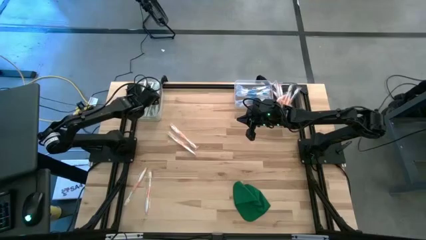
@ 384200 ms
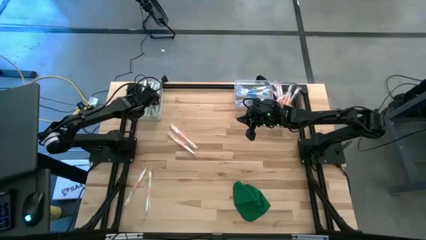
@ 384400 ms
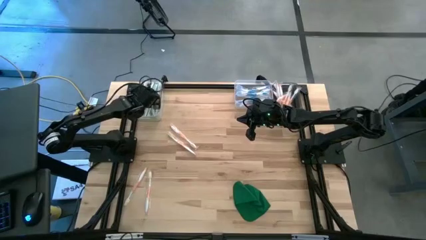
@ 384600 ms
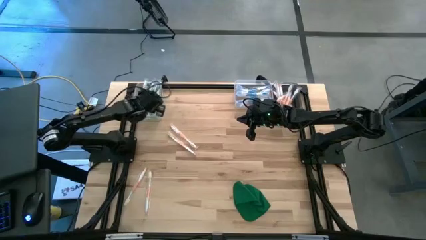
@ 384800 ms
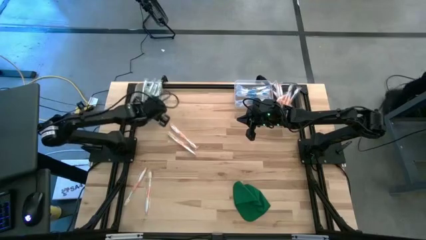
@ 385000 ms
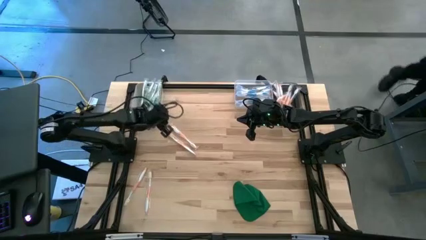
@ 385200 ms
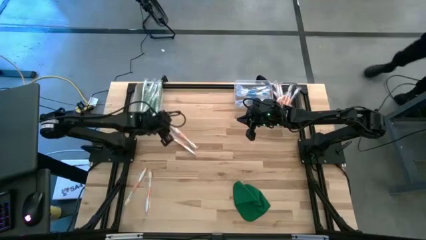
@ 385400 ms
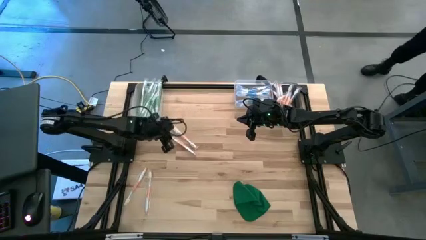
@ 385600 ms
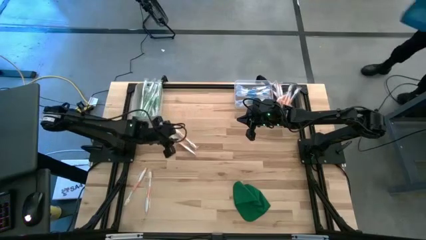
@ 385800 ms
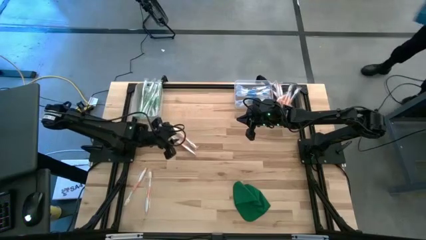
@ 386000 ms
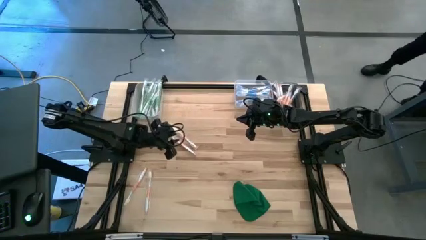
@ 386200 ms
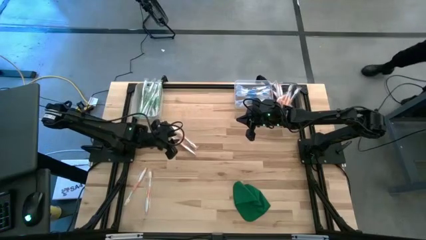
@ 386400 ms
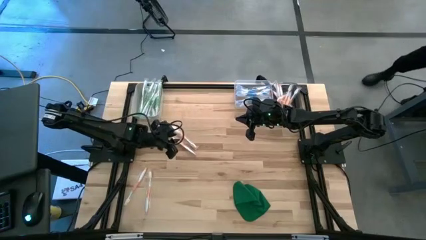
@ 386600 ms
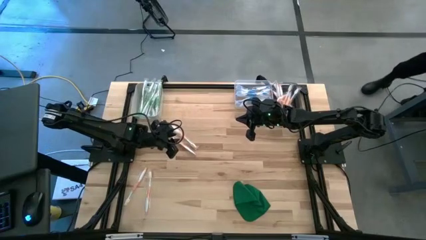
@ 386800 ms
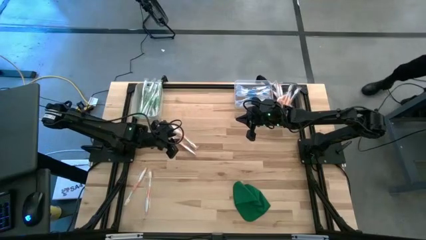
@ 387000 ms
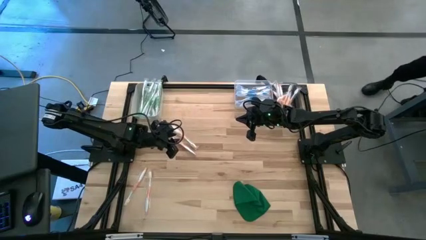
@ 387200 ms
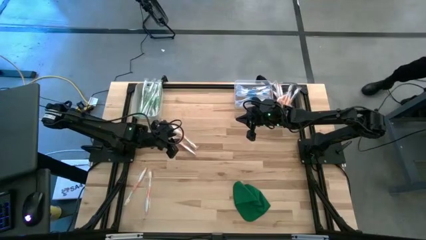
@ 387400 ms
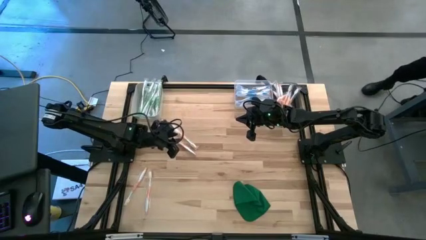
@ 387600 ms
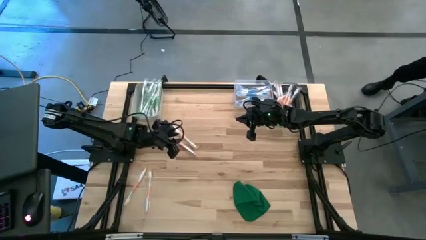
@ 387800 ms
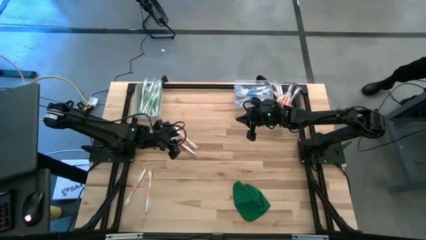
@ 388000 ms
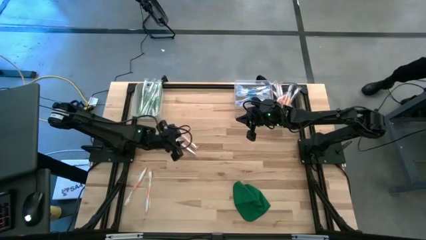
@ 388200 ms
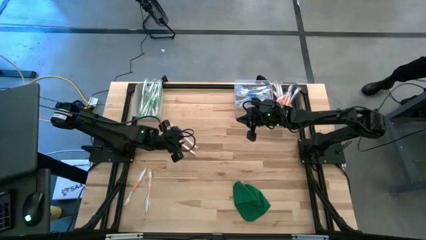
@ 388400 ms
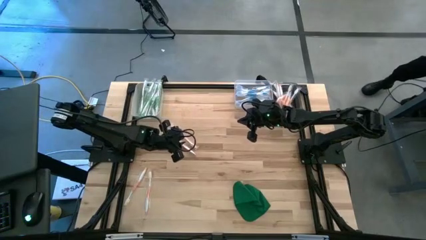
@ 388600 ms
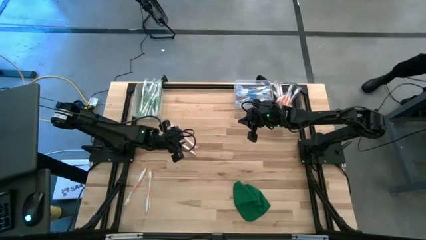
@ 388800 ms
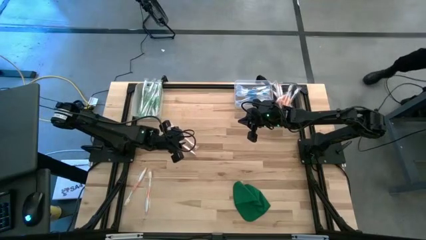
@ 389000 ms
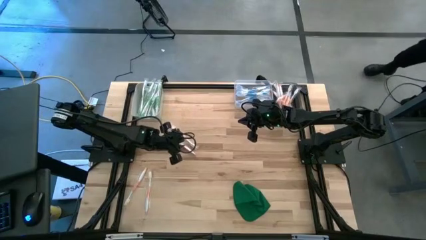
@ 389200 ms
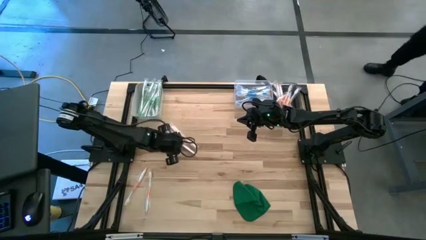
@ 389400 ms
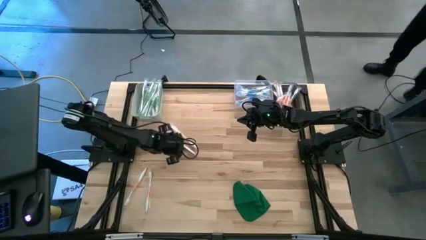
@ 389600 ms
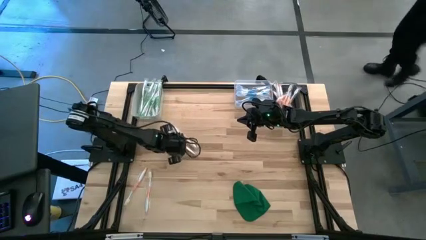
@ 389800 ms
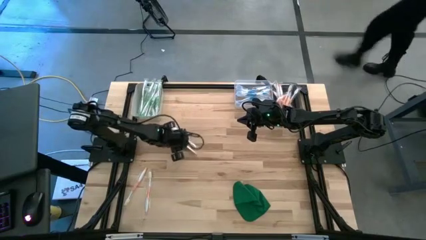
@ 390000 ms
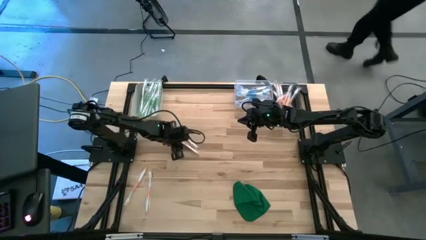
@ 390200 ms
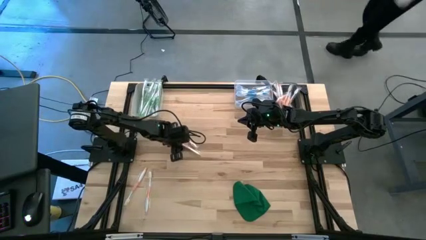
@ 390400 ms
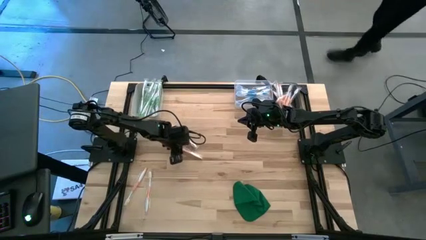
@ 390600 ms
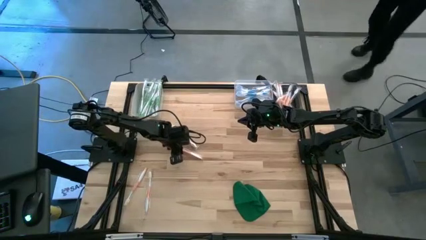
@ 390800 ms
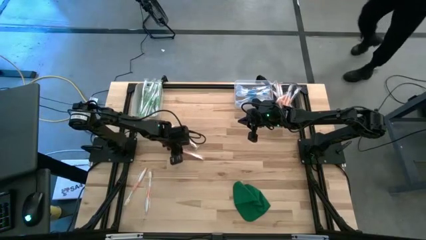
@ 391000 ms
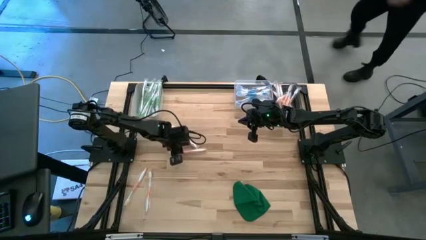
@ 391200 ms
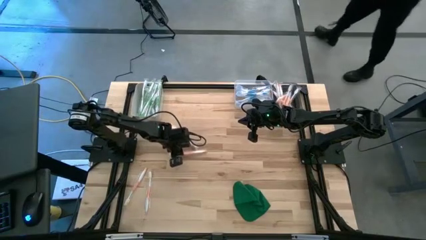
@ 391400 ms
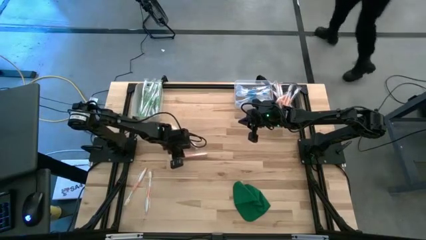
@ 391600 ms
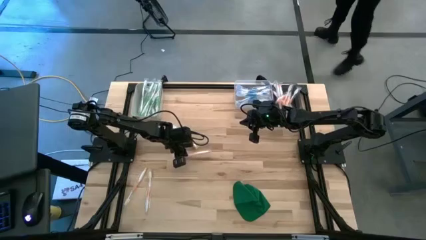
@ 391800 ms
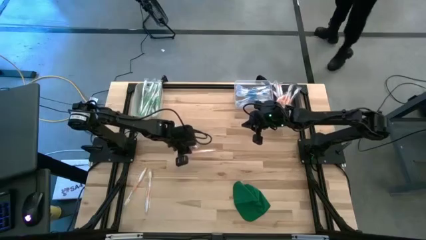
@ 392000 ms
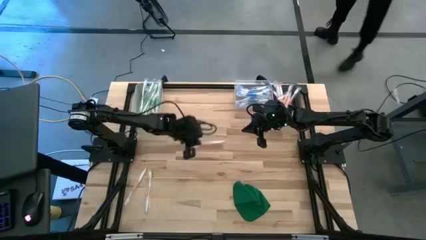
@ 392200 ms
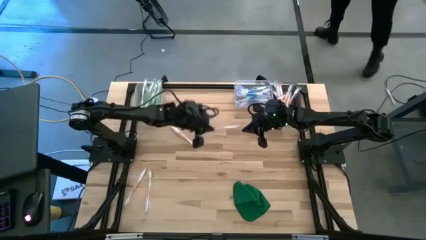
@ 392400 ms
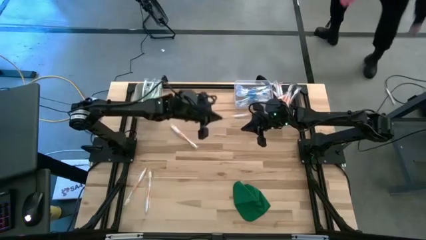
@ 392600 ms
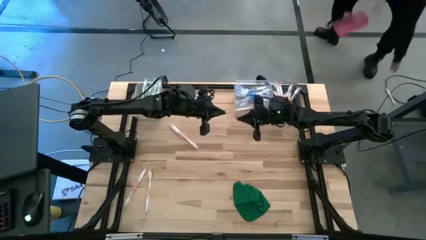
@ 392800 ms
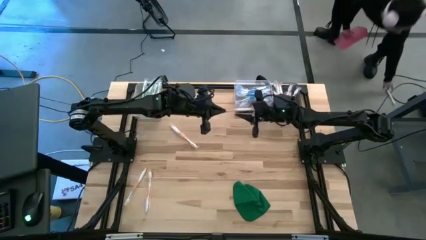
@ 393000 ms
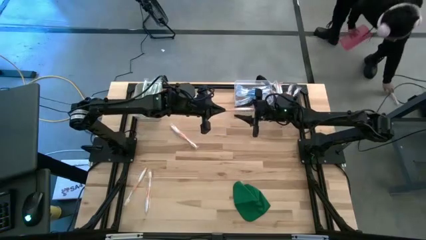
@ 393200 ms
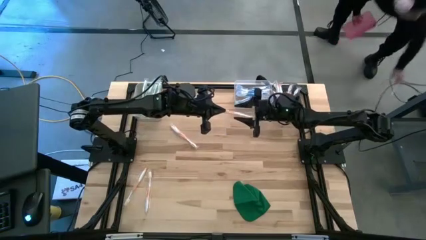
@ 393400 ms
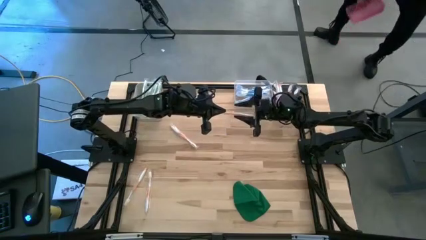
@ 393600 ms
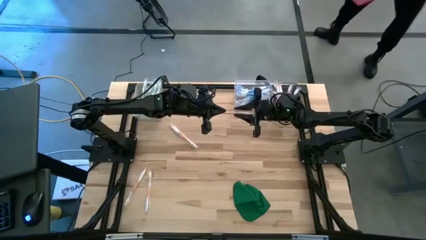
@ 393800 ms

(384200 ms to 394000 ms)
Task: Pick & Place Toothbrushes
Put the orange toothbrush into the black bin

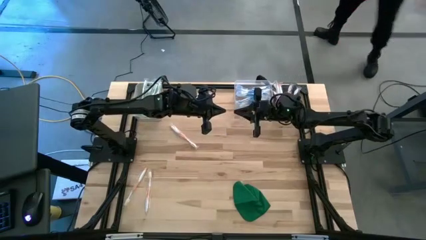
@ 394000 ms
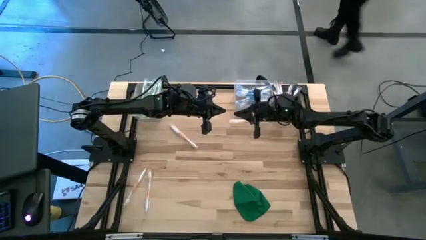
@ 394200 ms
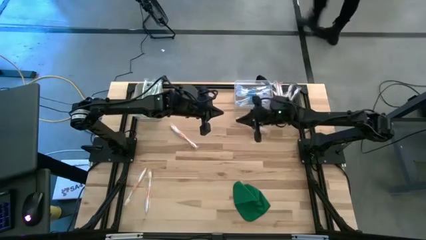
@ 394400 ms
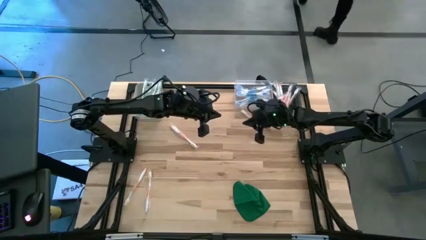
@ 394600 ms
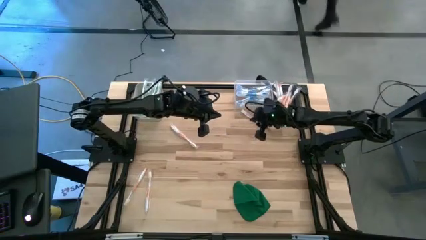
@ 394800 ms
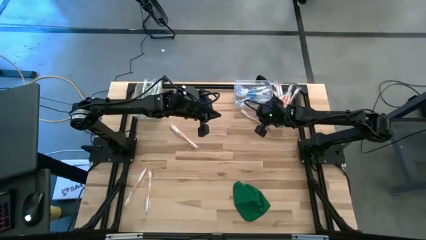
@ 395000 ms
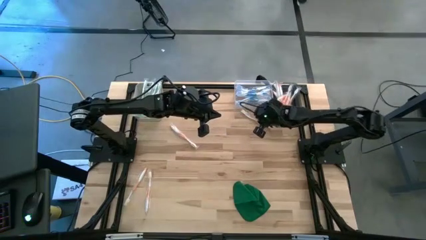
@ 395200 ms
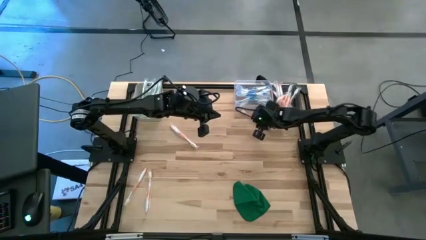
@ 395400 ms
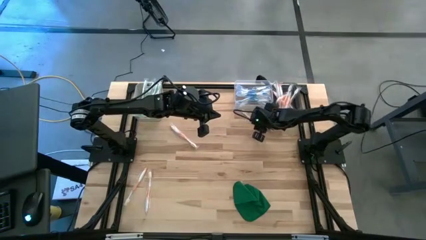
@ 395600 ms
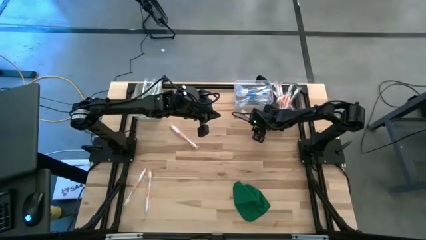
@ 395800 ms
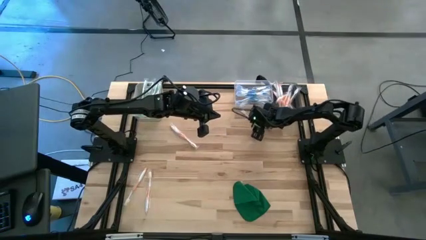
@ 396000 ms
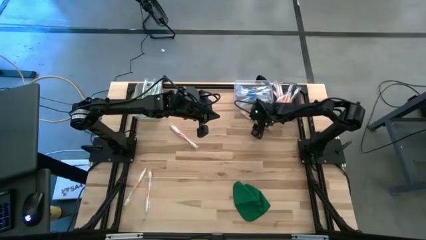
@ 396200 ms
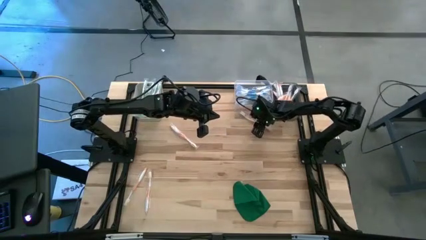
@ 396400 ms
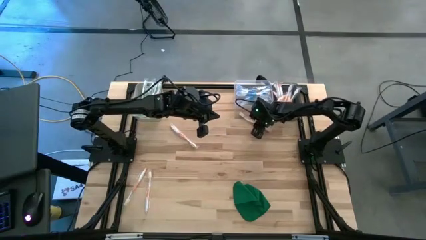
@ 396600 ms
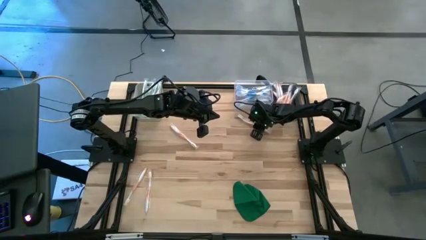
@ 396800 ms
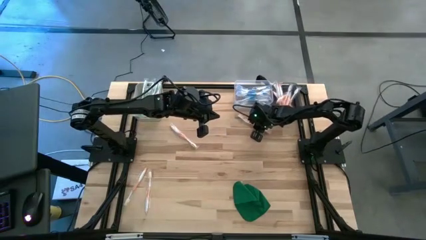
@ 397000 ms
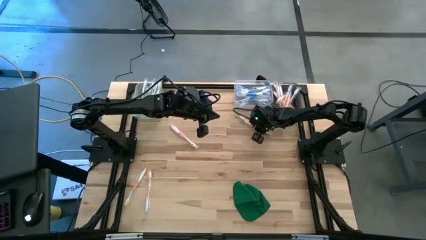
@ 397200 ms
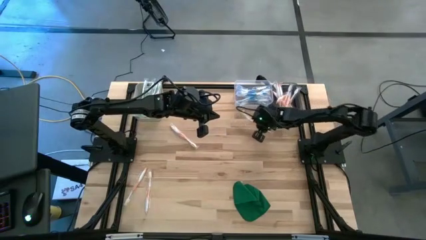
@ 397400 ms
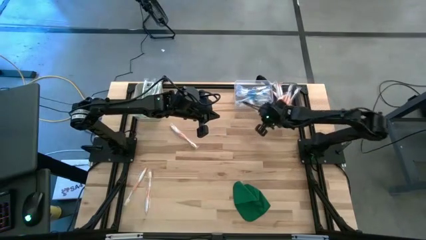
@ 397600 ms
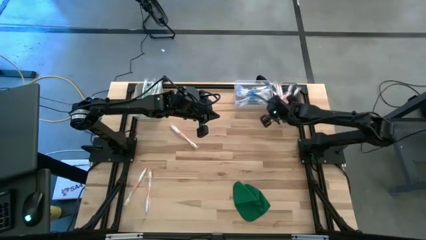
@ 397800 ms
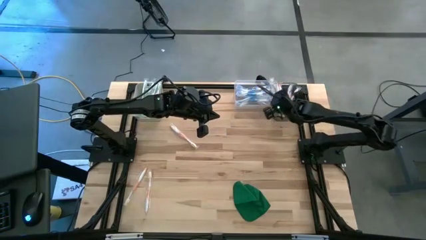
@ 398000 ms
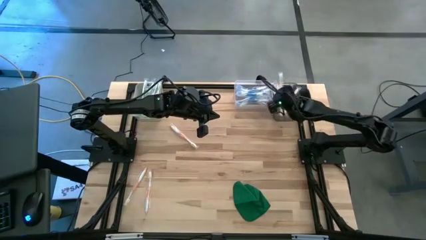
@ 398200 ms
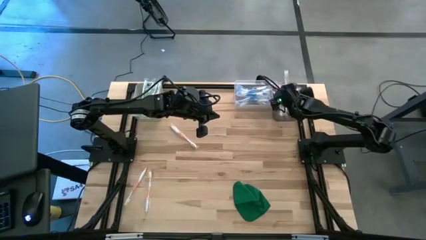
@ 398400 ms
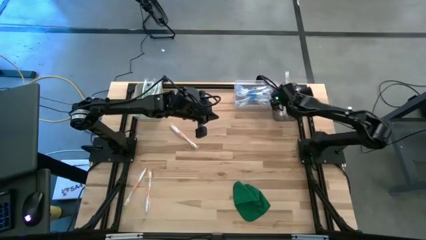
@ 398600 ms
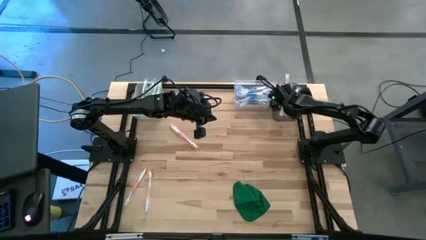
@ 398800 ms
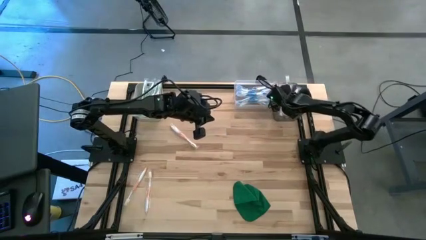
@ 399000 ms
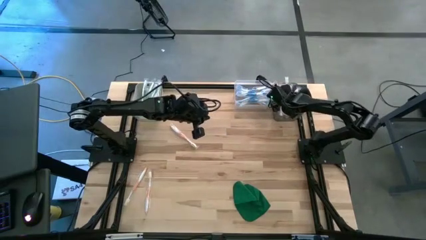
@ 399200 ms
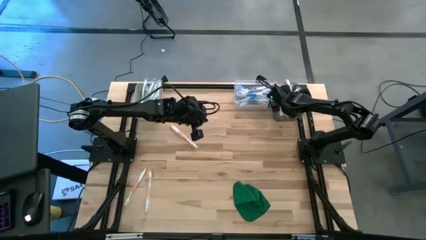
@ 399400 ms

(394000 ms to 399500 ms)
Put the orange toothbrush into the black bin
